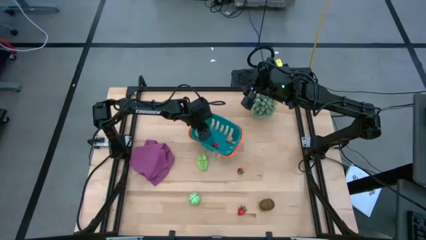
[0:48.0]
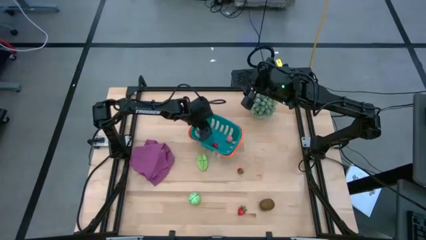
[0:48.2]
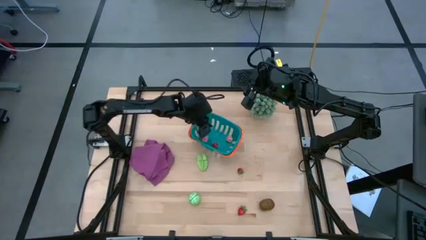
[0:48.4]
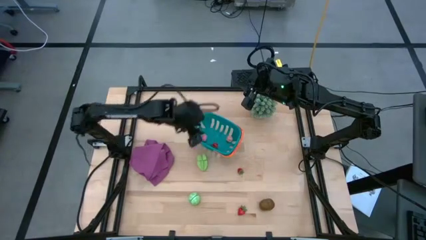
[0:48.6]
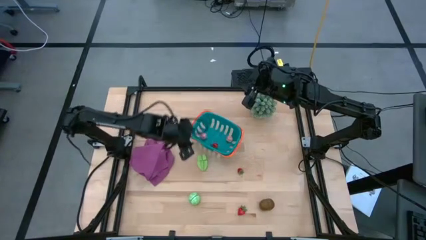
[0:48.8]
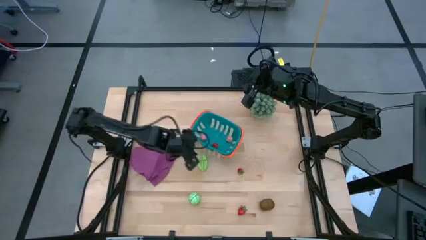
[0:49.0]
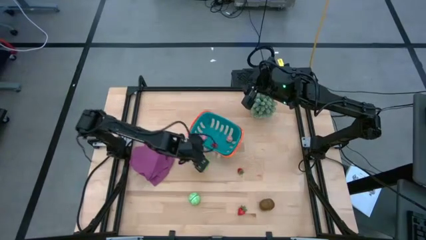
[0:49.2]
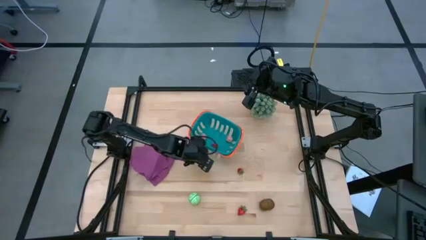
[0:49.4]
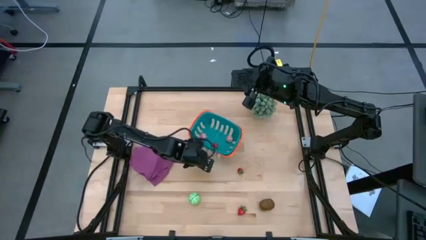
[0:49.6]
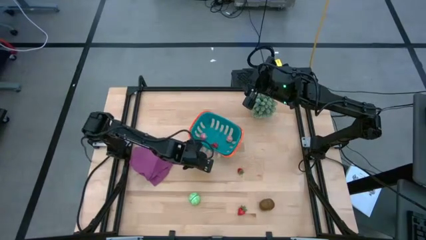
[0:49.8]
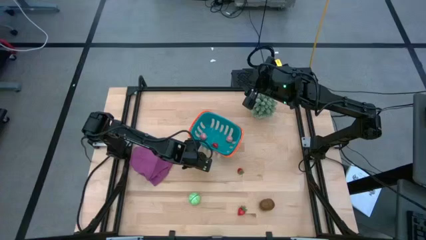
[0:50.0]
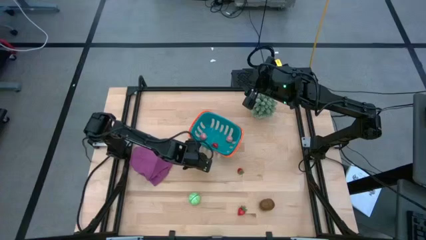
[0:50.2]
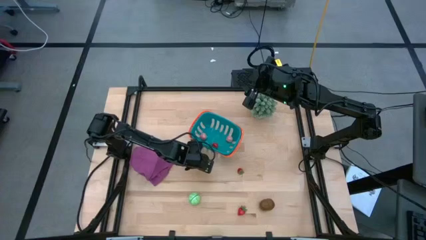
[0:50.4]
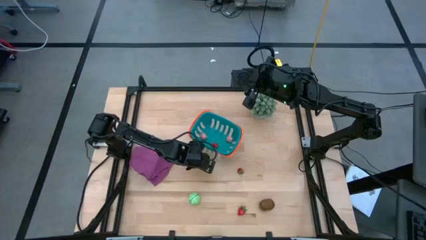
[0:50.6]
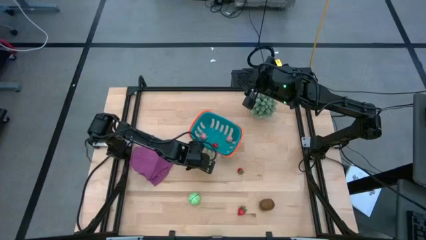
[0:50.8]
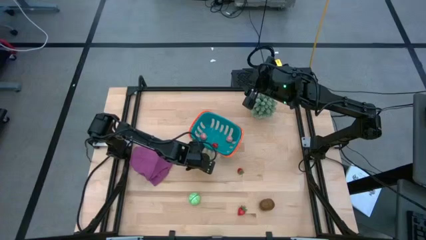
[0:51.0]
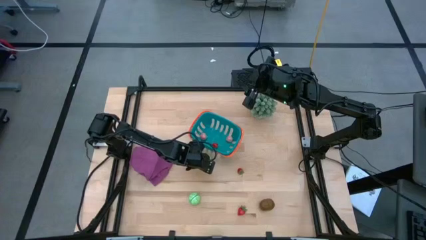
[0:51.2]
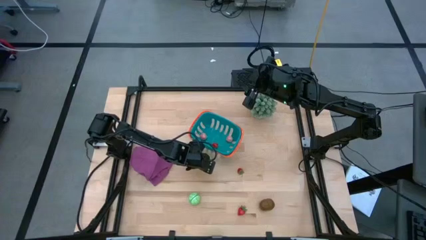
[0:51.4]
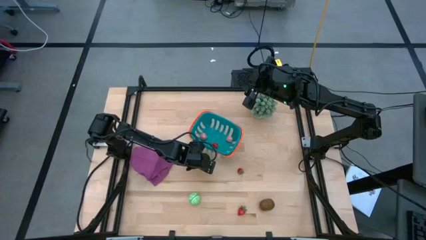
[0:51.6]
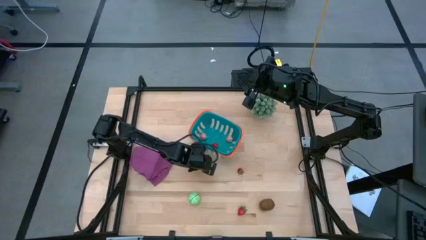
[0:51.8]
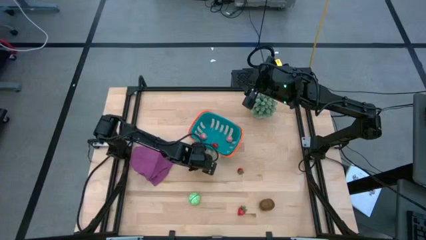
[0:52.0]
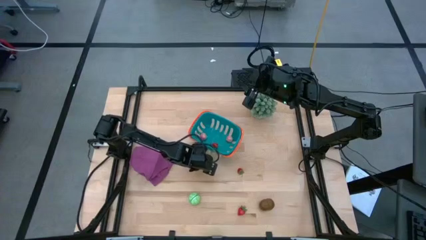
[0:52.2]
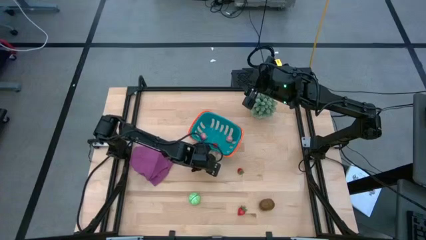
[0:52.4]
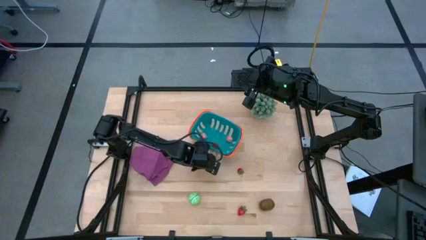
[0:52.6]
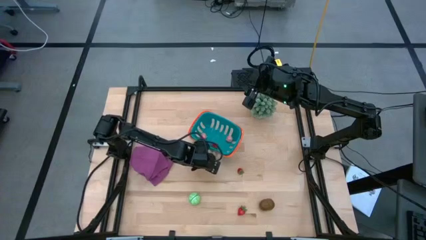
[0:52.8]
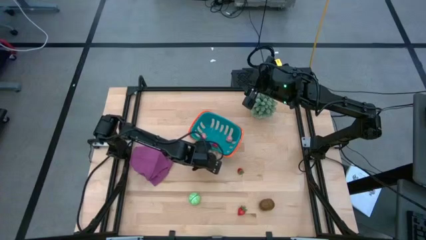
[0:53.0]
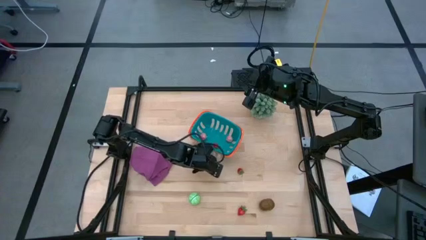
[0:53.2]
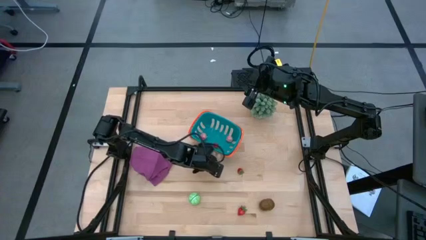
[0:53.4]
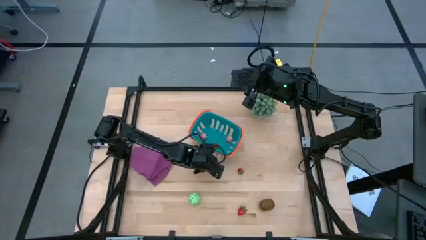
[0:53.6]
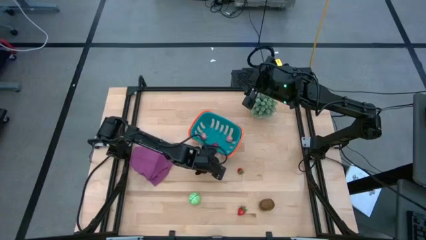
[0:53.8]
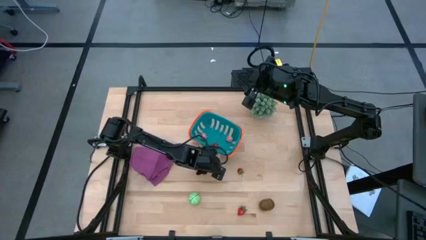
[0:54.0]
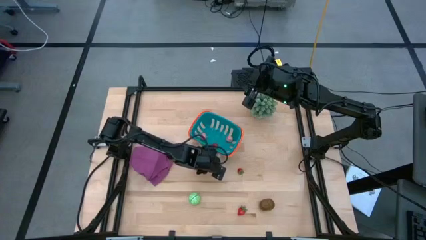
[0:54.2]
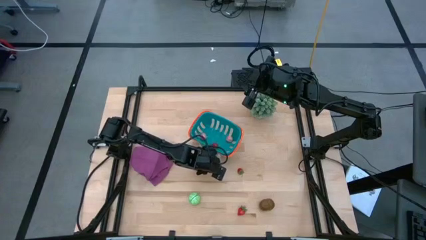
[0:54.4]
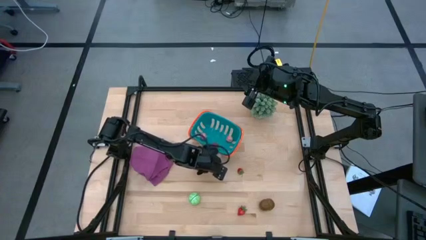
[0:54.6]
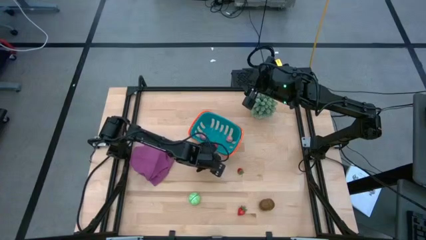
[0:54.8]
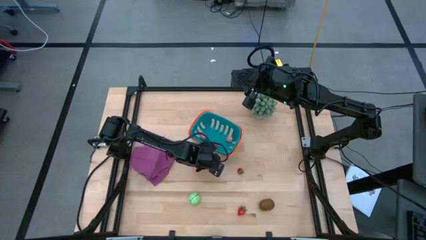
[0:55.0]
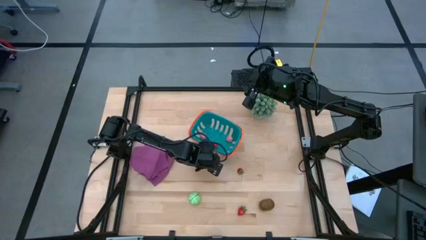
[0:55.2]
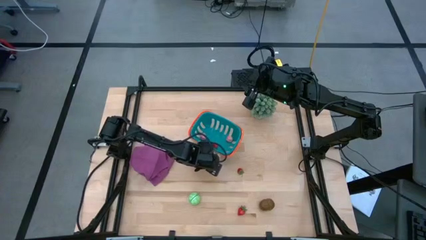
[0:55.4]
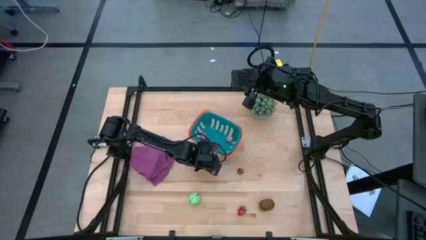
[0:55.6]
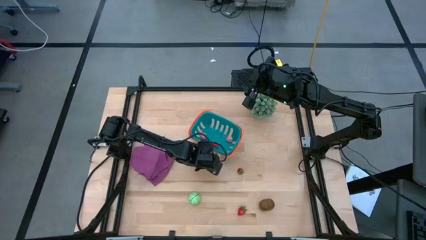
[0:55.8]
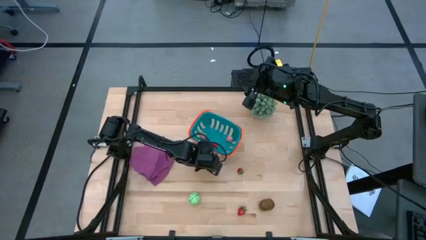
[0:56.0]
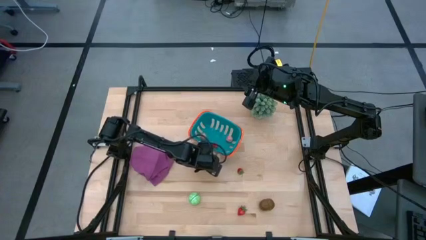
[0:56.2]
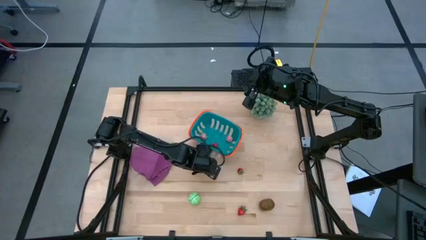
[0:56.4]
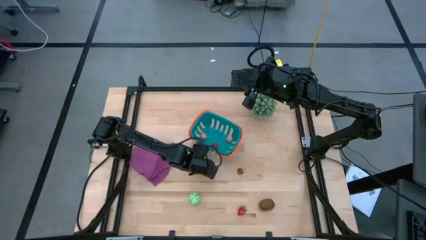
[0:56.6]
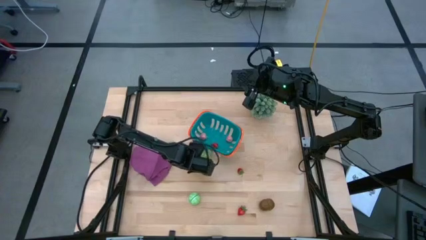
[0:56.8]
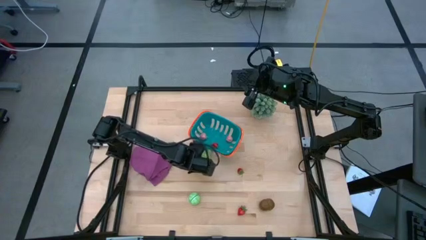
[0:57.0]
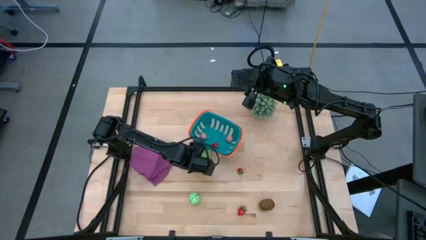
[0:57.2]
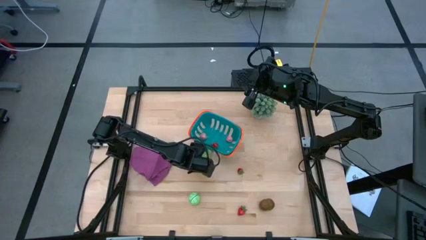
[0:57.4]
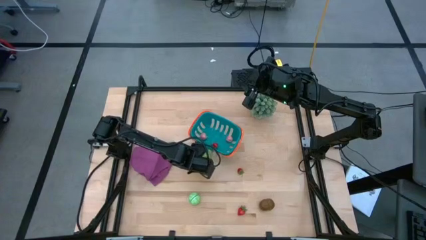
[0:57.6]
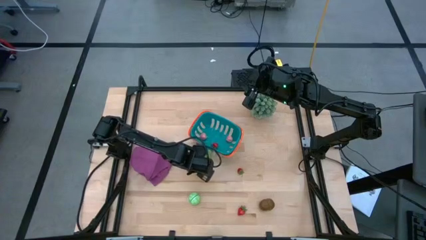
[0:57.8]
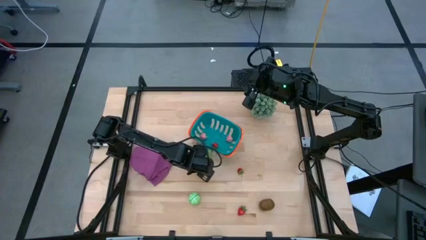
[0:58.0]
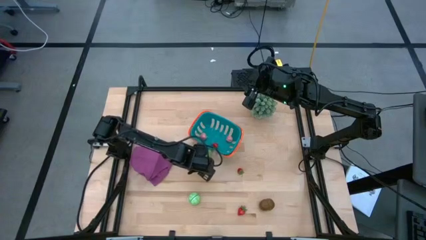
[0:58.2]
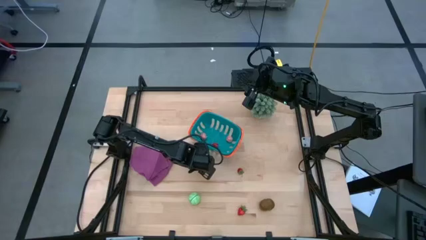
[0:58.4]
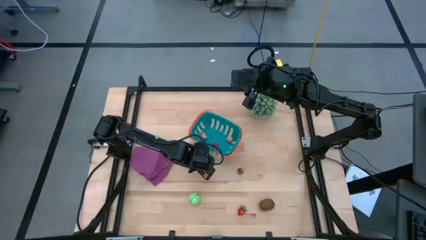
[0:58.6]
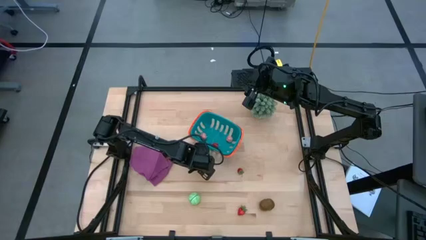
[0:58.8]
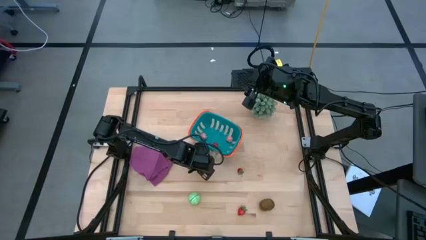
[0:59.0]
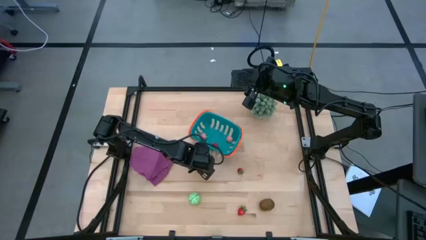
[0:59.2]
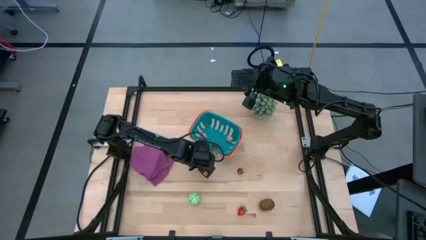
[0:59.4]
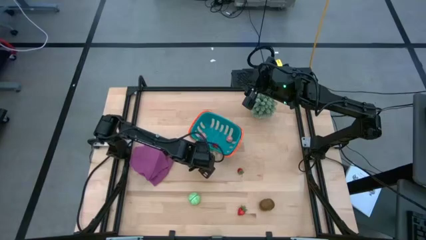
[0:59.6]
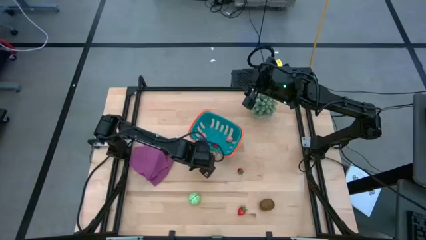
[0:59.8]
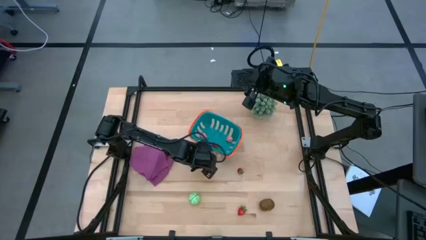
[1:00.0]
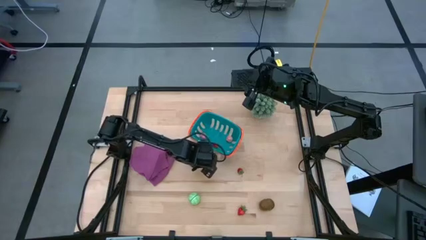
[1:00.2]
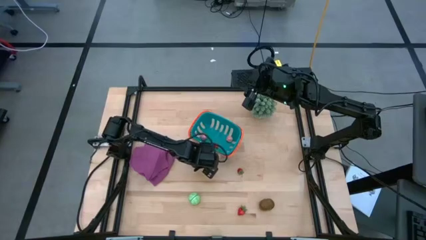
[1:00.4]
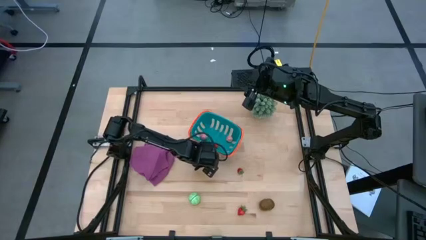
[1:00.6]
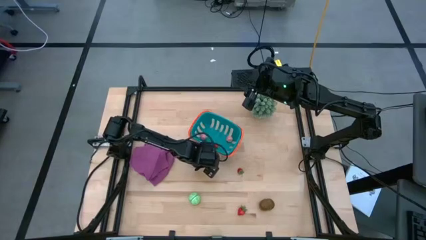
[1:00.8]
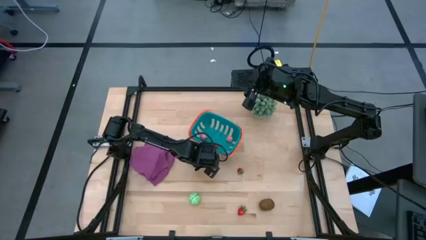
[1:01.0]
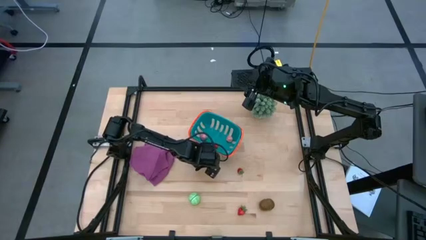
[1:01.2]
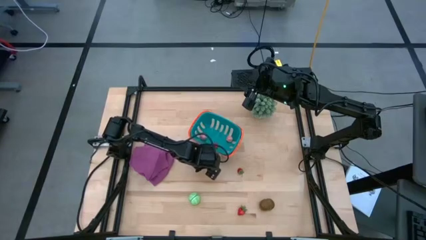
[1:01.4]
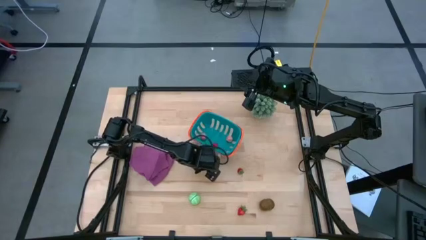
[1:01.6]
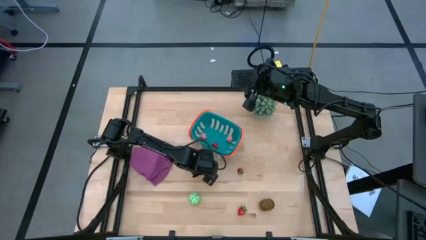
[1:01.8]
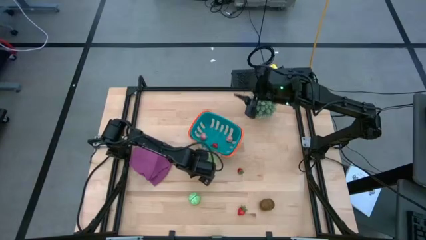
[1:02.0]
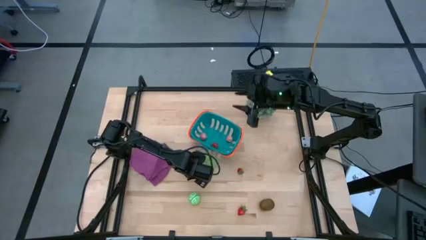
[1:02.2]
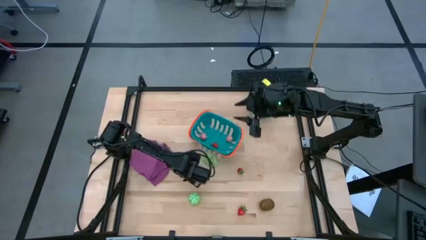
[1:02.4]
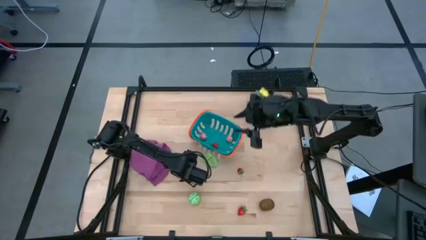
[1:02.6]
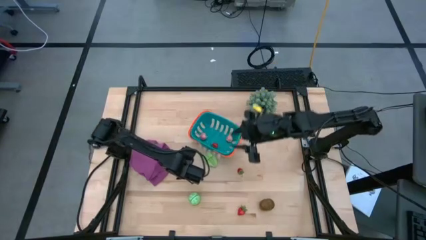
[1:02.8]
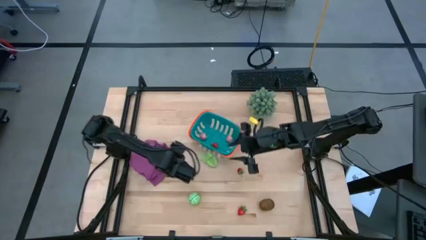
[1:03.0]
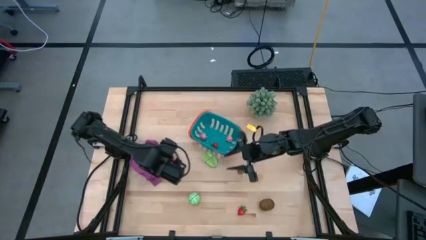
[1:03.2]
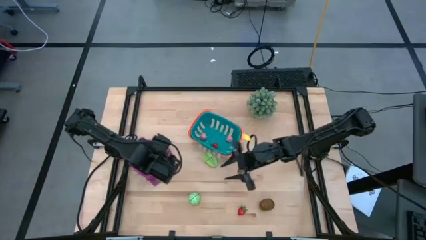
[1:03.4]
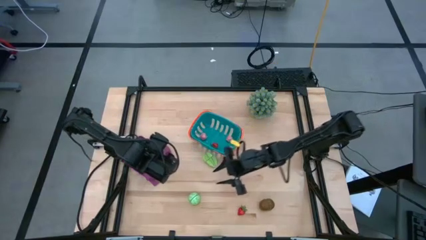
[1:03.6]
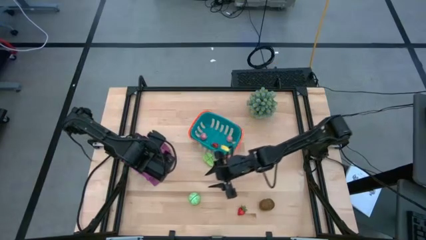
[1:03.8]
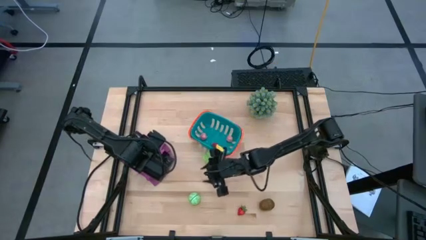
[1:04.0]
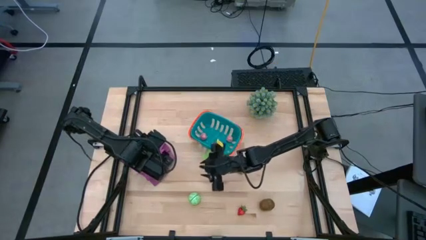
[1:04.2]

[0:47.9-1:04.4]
Task: Pick and placing Produce into tupperware
Put the green star fruit into the blue basket
